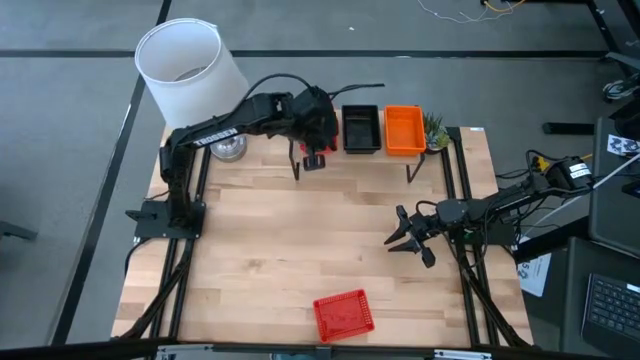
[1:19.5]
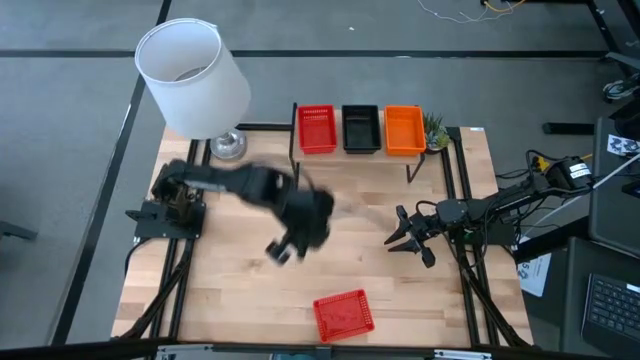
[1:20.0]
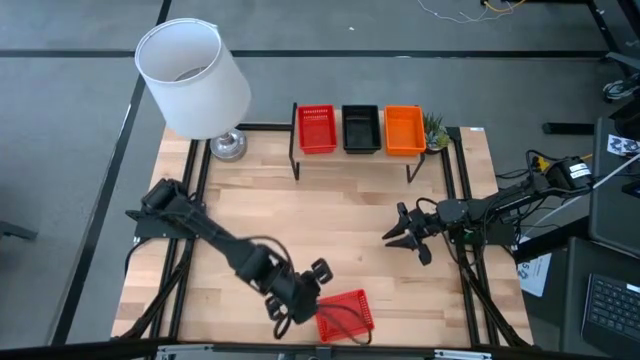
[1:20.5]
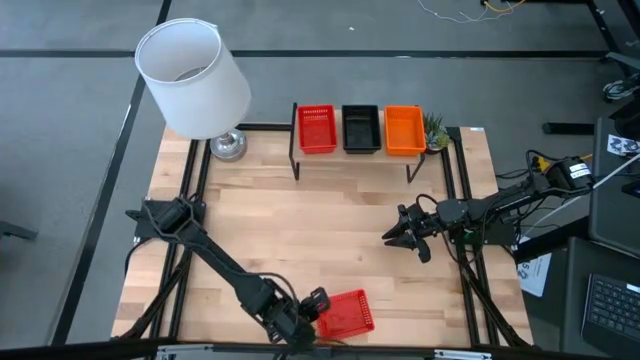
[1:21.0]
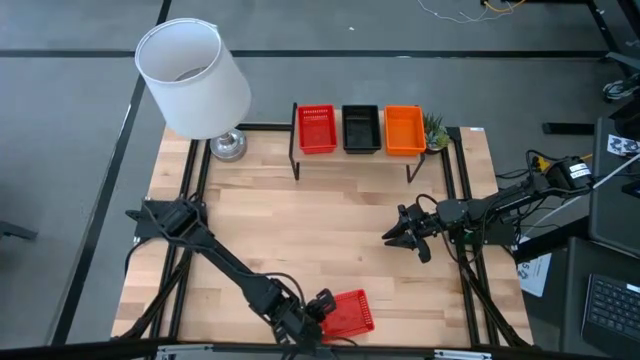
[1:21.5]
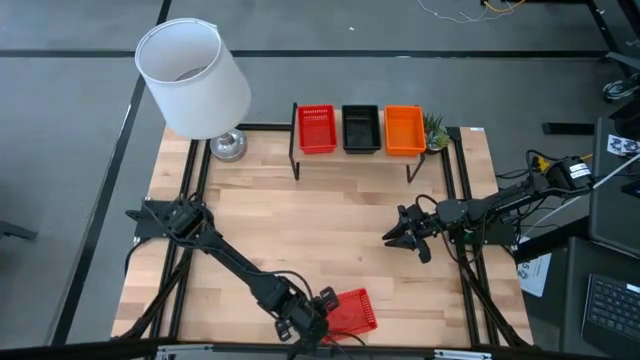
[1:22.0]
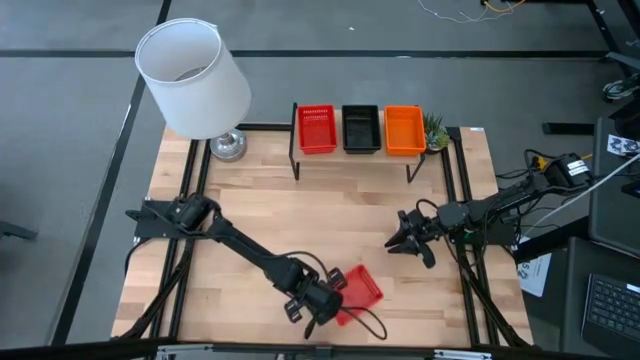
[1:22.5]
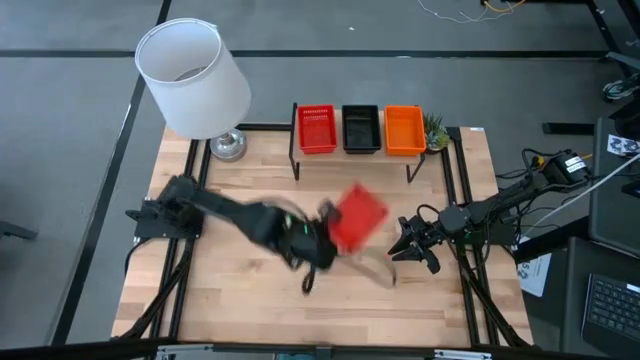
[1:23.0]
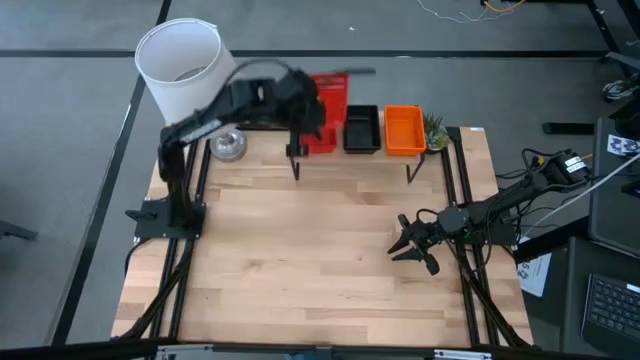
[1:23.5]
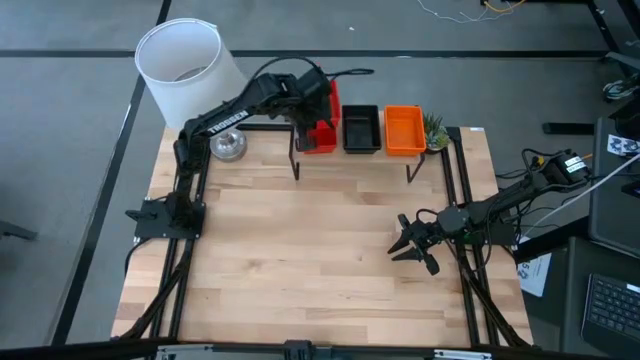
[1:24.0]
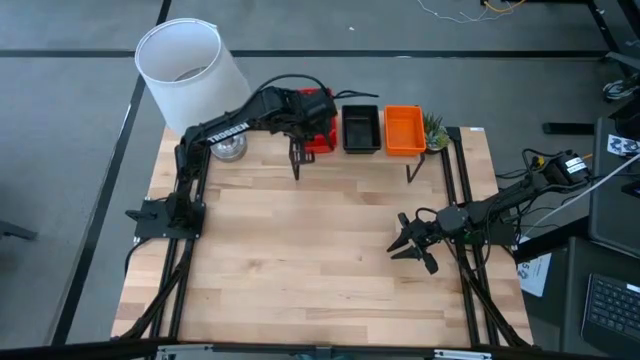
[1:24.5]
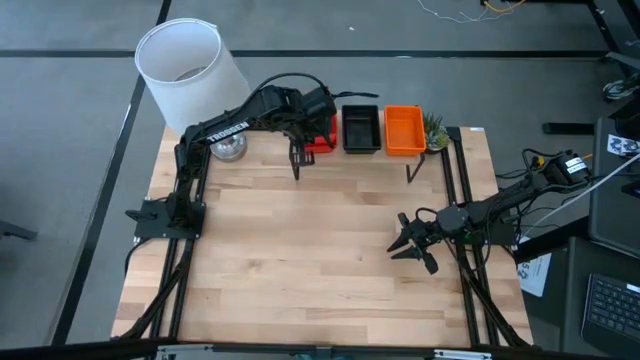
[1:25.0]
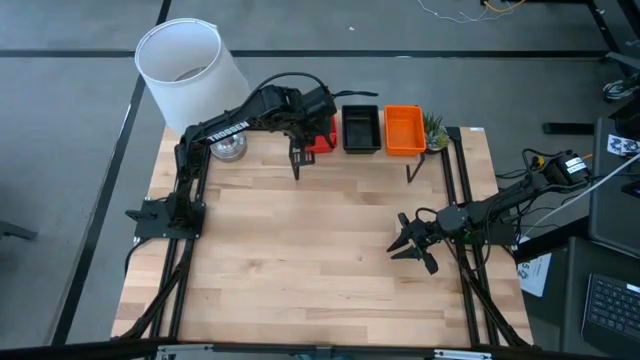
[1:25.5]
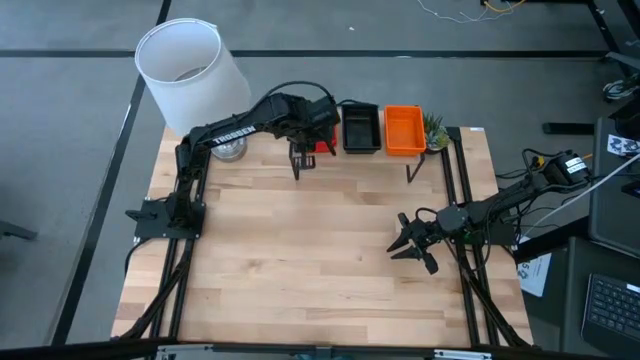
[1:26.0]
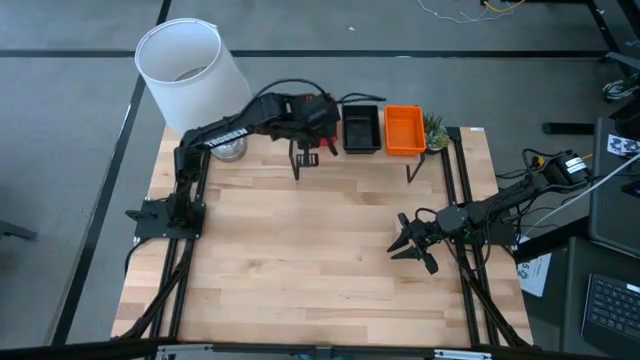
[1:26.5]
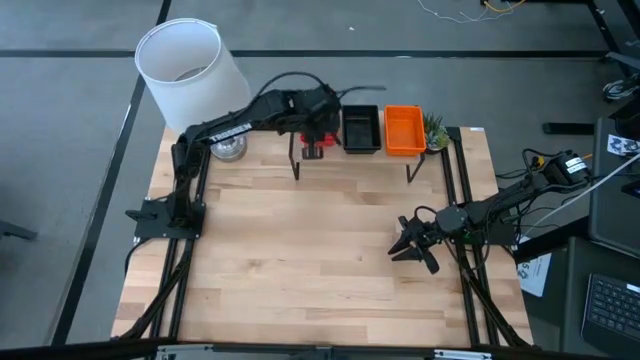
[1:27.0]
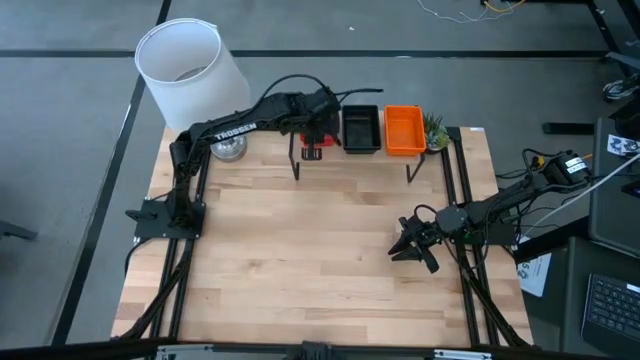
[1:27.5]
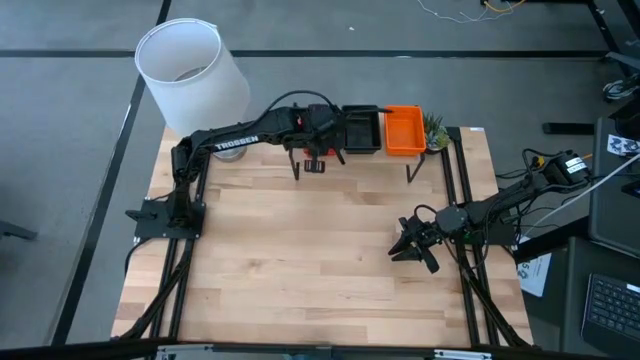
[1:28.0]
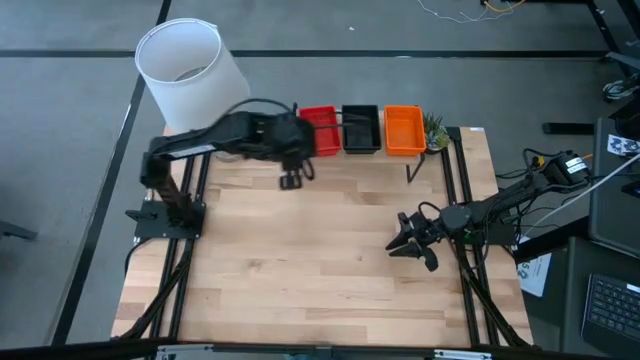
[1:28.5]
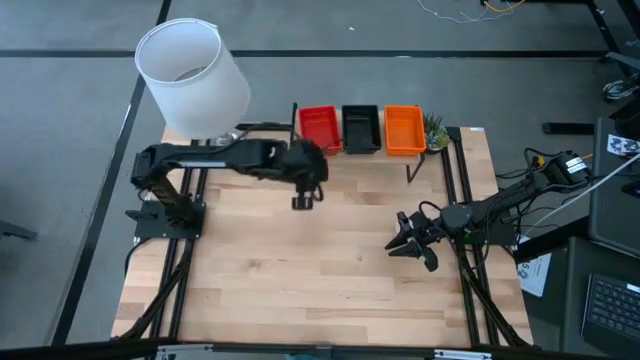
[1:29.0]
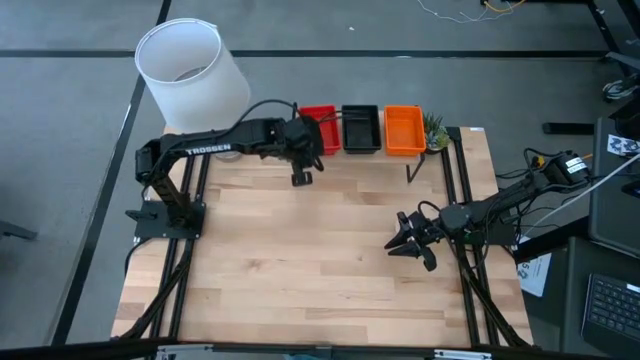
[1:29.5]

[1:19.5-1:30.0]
Task: Stack baskets on shelf by color
Stack the top red bin on the other red bins on the shelf

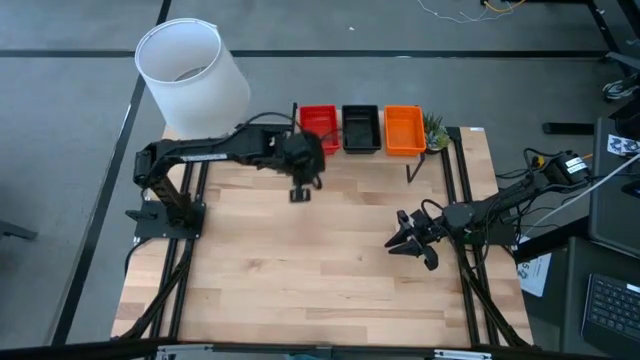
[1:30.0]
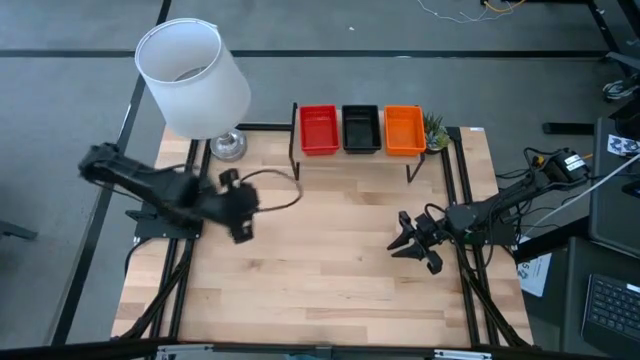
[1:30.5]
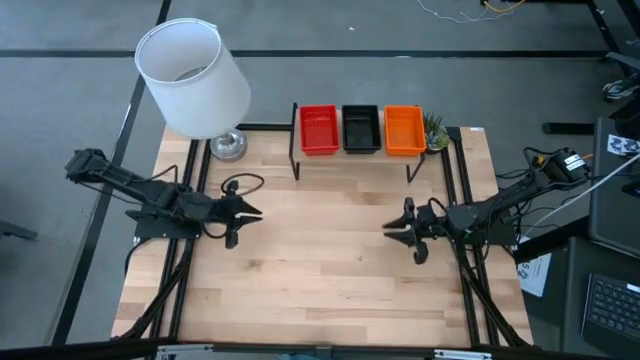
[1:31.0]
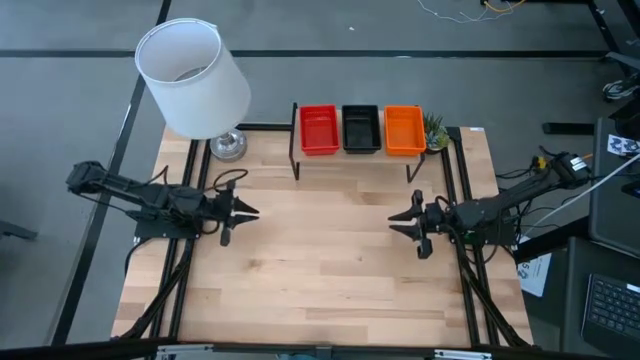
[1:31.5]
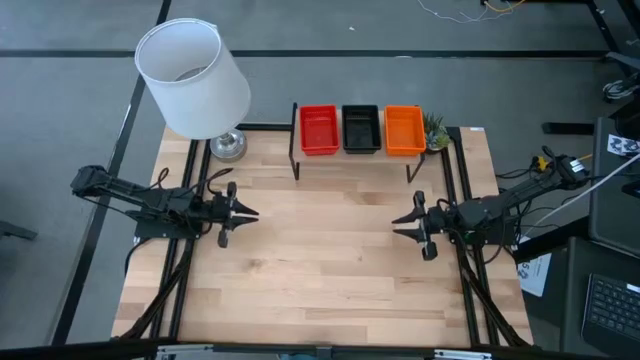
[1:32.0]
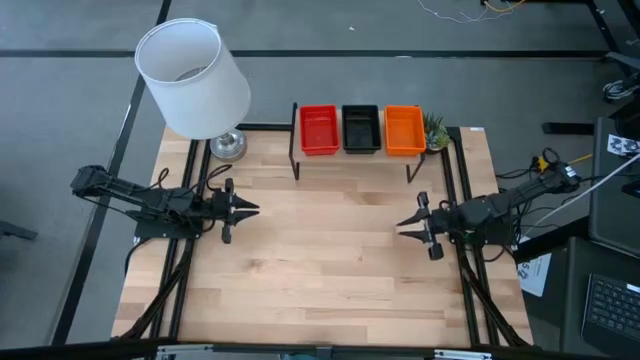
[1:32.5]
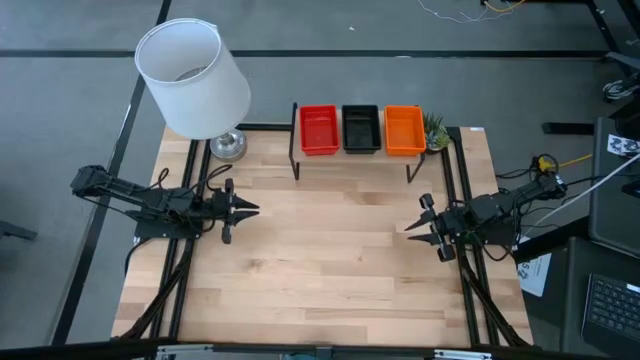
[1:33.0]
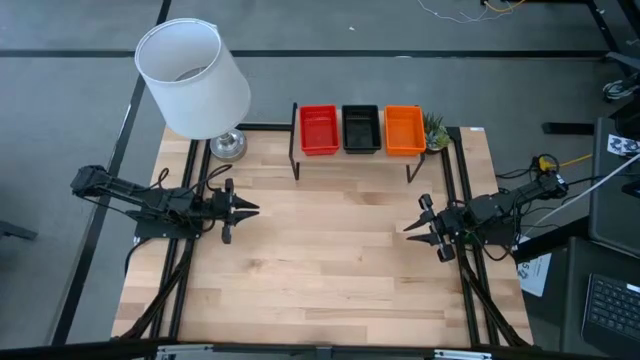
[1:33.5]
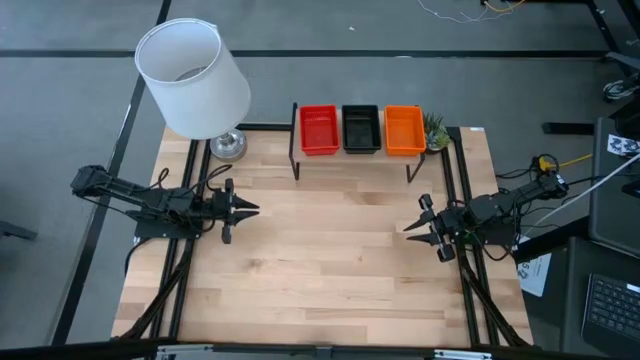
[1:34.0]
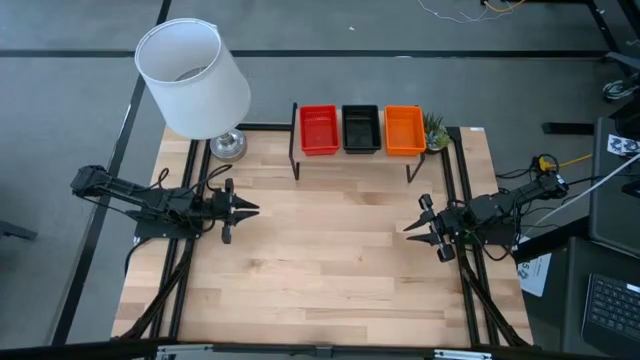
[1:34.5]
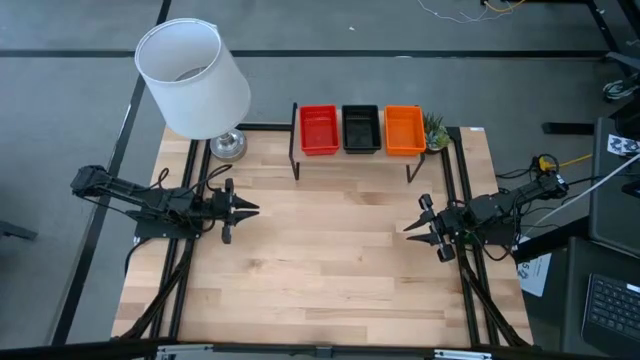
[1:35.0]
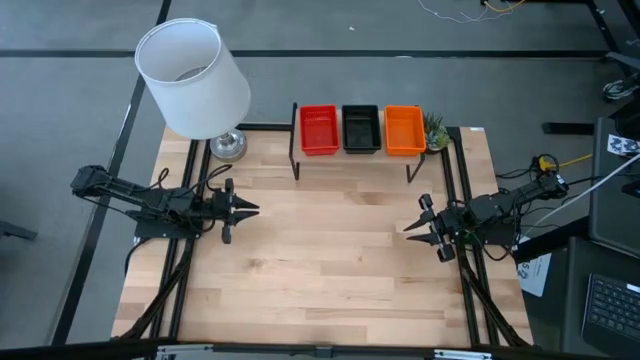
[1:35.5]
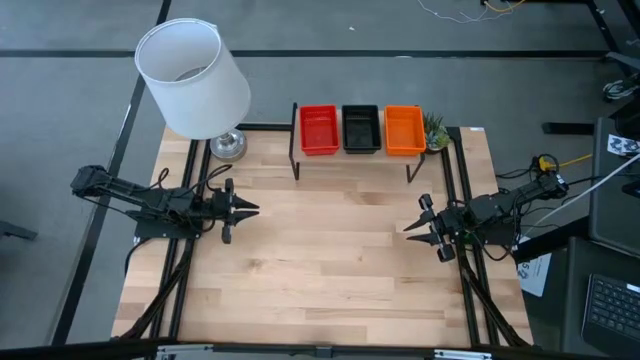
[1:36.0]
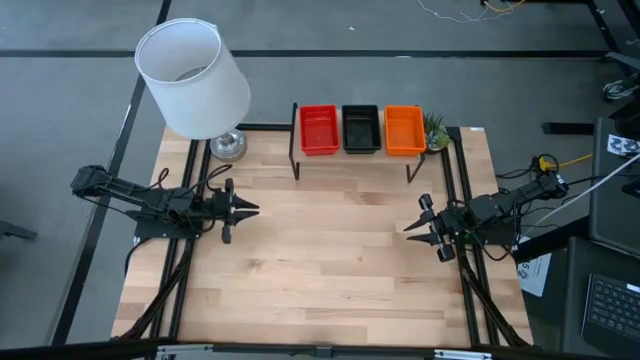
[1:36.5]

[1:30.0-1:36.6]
Return to Home Position

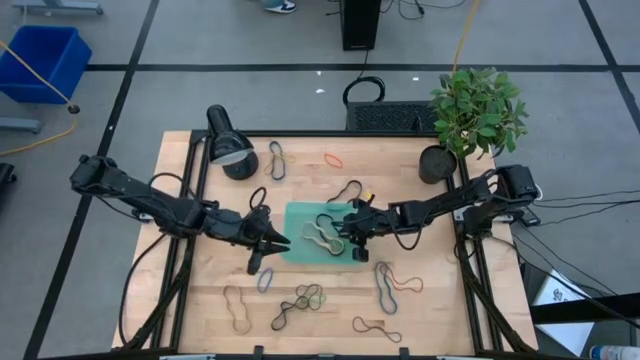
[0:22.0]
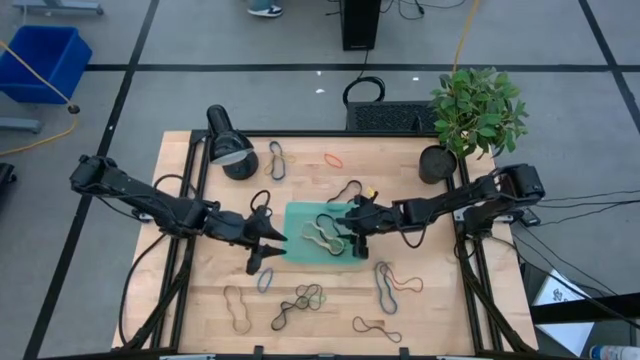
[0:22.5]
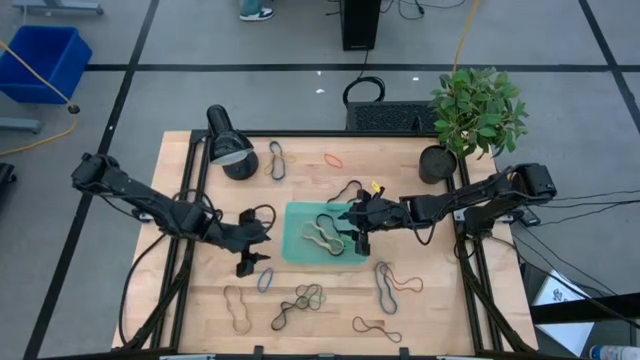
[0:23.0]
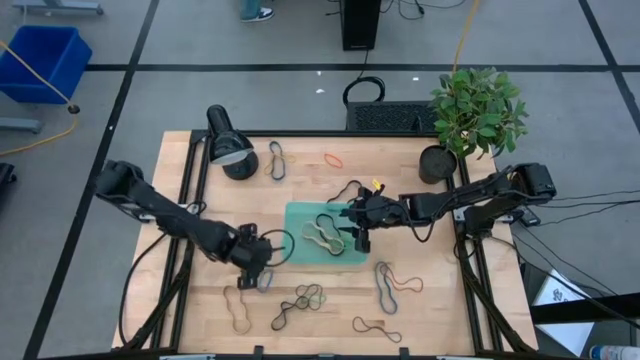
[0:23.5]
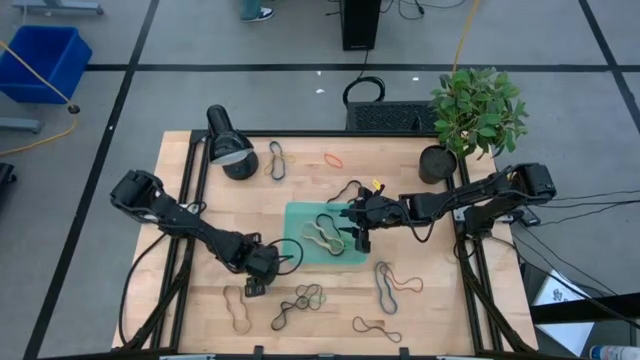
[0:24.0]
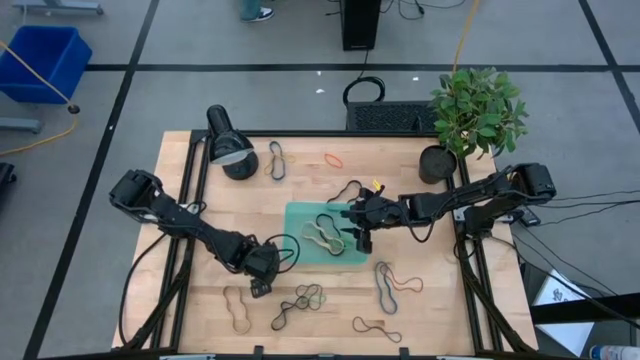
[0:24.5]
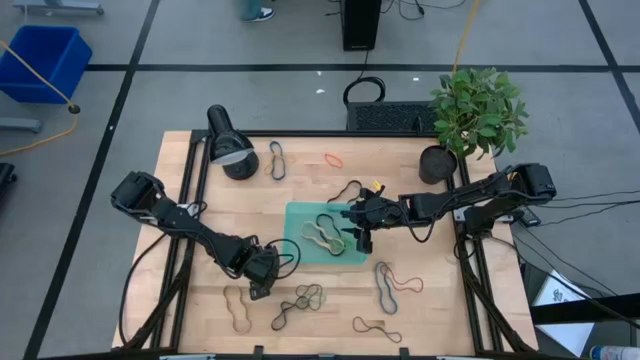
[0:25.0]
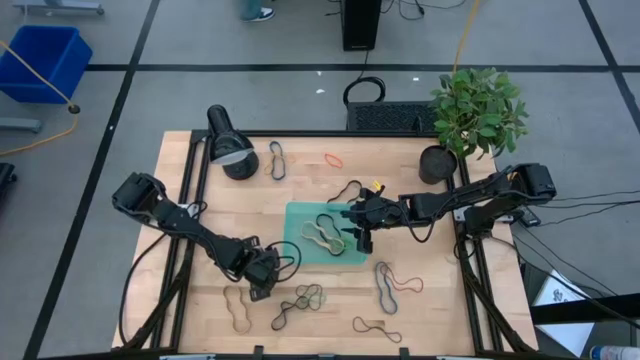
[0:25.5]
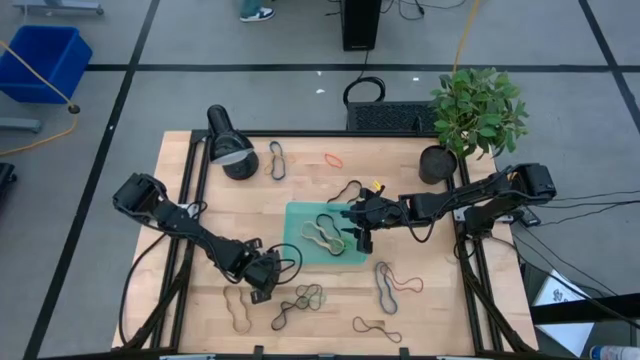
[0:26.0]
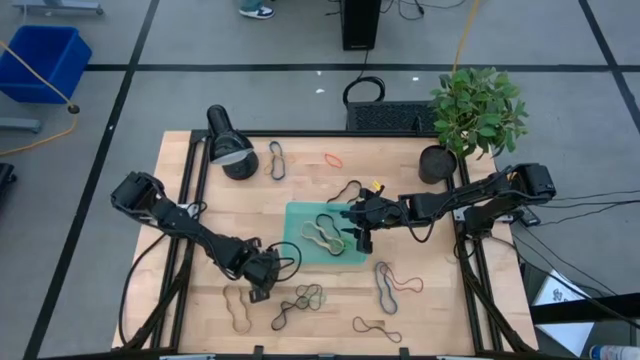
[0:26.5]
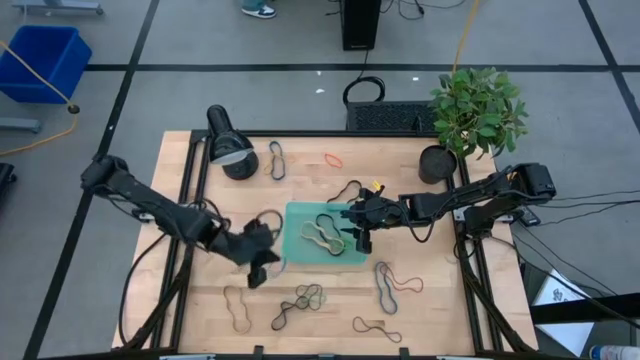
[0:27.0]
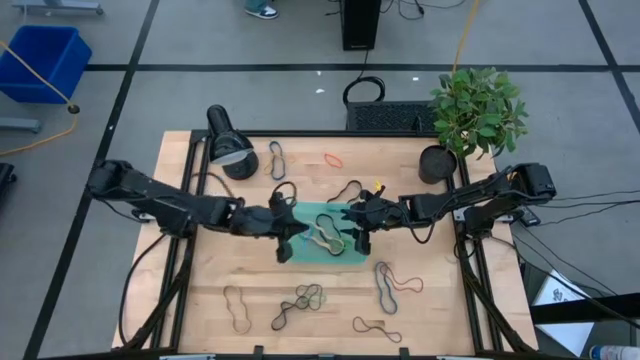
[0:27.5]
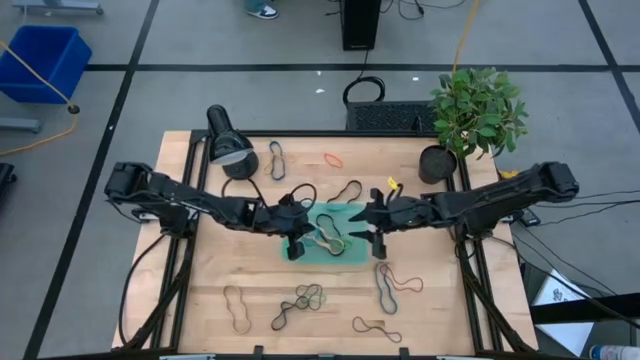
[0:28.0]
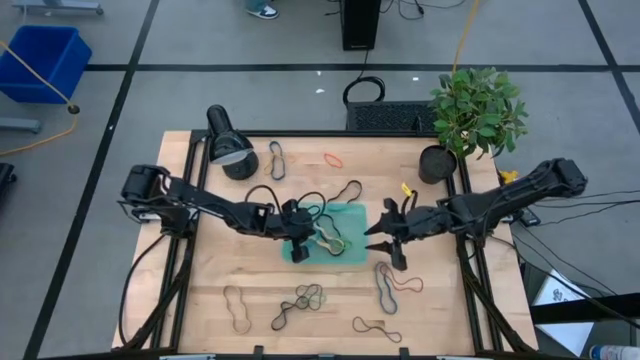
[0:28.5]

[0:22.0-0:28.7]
Task: Pick and place rubber bands into bin
Put the blue rubber band into the green bin
